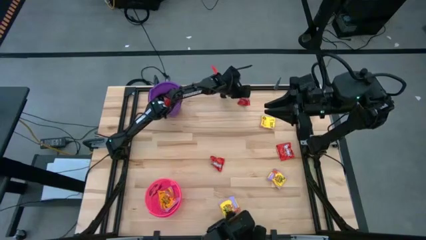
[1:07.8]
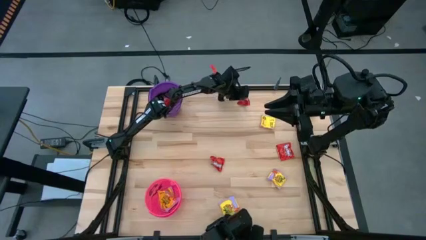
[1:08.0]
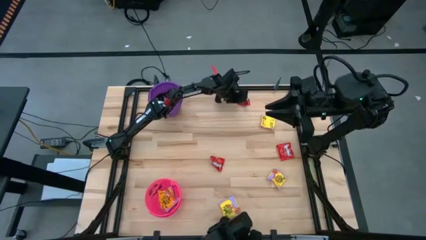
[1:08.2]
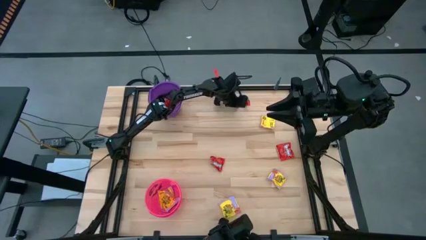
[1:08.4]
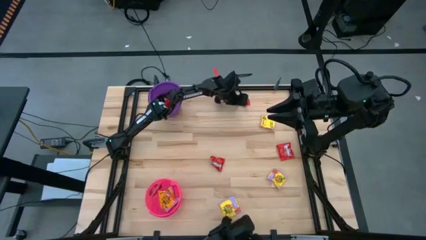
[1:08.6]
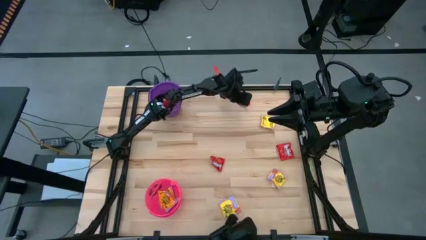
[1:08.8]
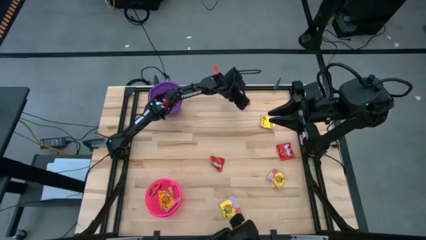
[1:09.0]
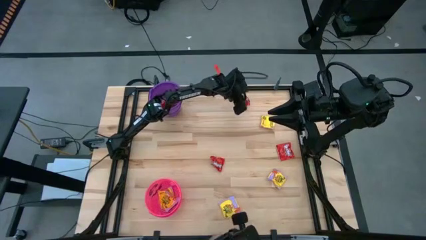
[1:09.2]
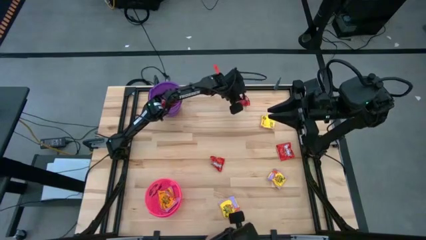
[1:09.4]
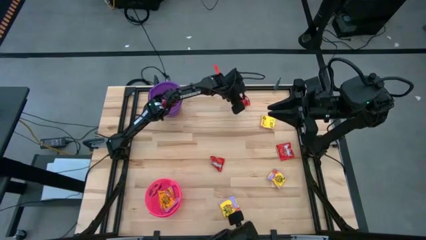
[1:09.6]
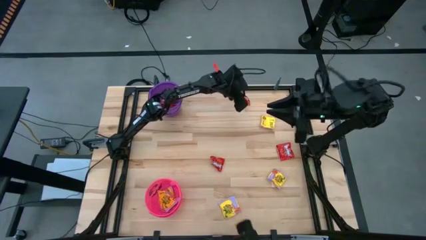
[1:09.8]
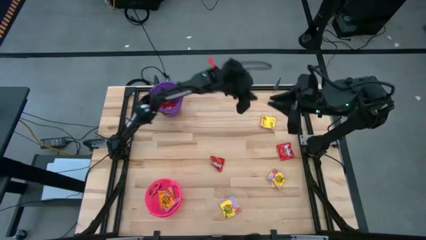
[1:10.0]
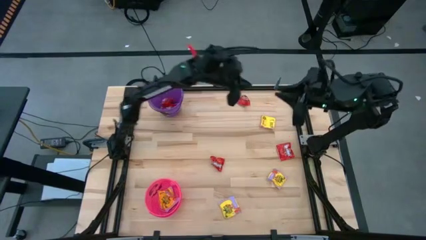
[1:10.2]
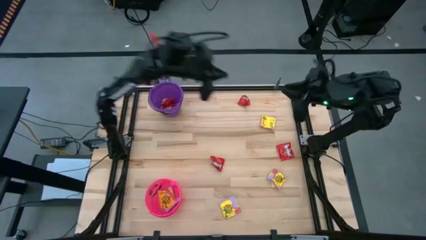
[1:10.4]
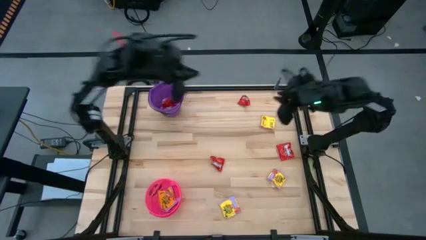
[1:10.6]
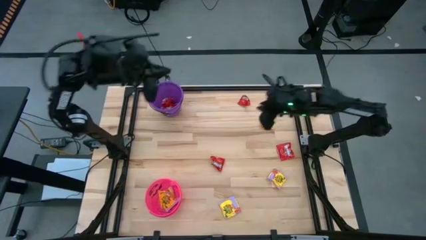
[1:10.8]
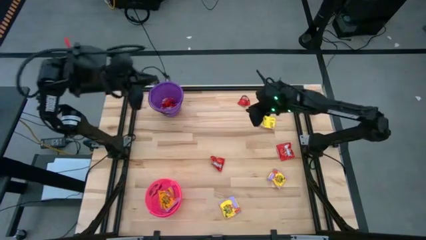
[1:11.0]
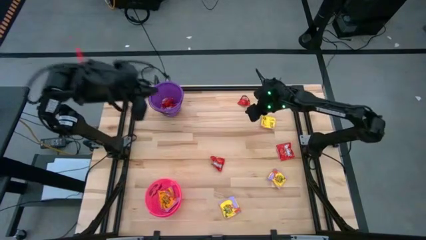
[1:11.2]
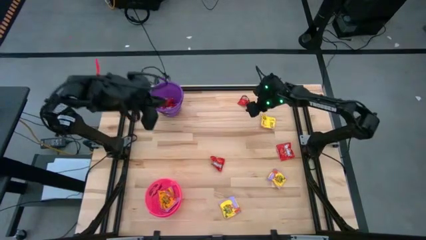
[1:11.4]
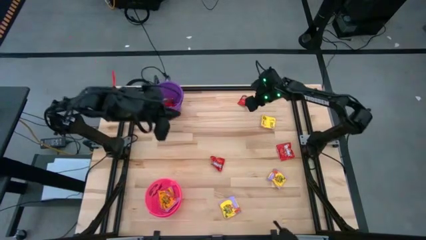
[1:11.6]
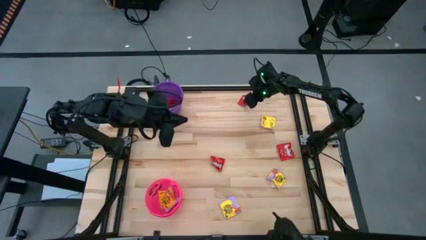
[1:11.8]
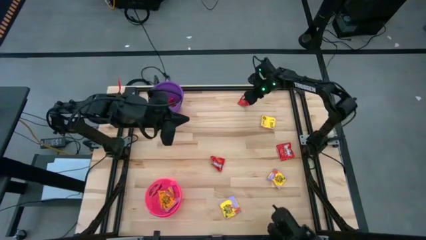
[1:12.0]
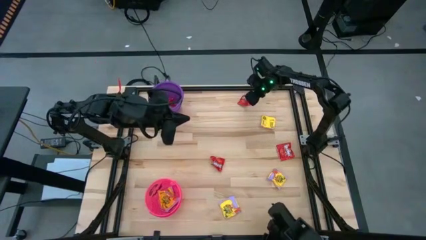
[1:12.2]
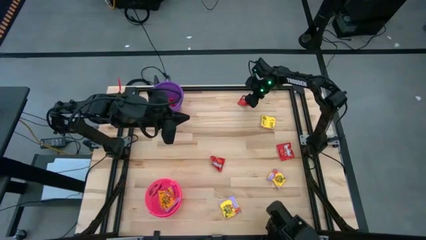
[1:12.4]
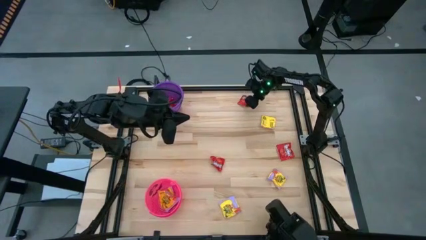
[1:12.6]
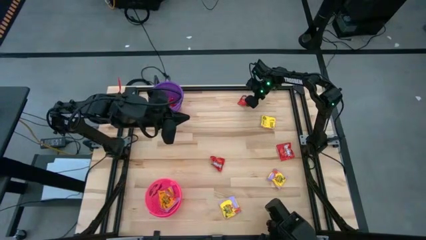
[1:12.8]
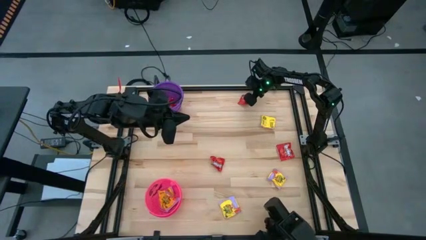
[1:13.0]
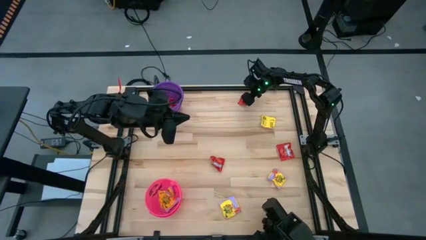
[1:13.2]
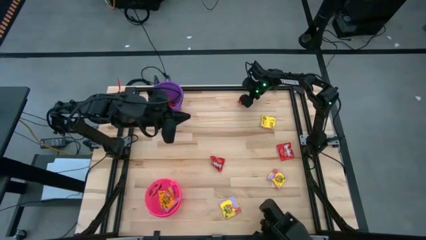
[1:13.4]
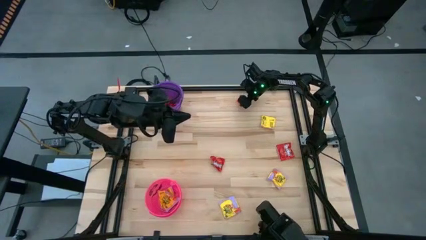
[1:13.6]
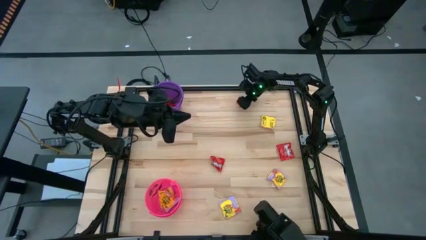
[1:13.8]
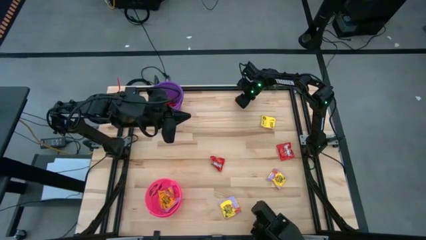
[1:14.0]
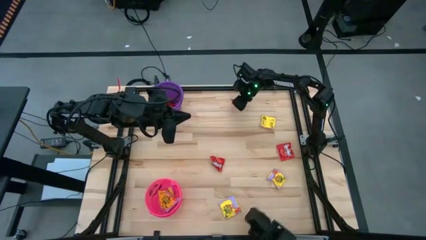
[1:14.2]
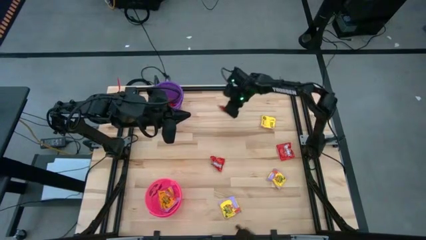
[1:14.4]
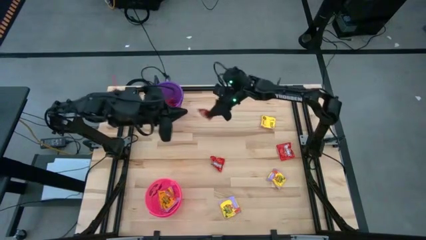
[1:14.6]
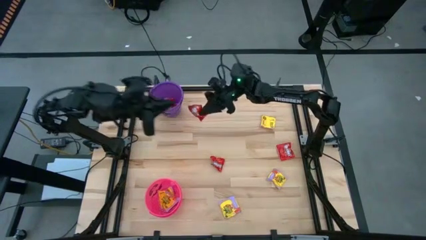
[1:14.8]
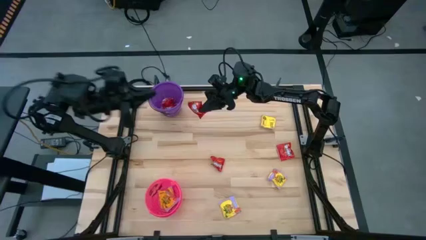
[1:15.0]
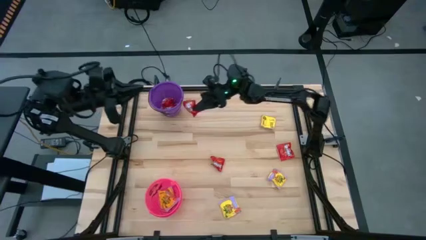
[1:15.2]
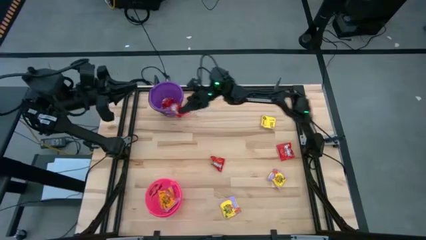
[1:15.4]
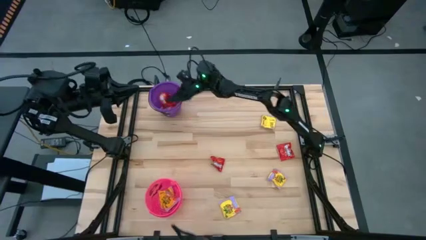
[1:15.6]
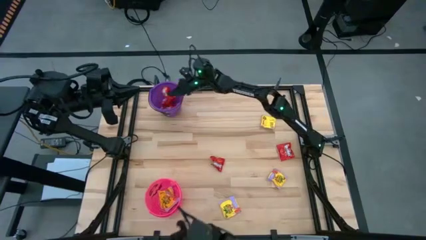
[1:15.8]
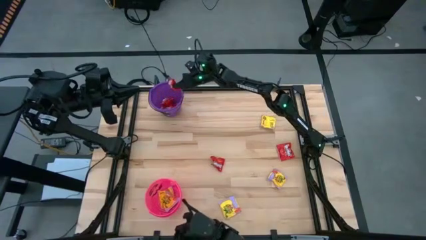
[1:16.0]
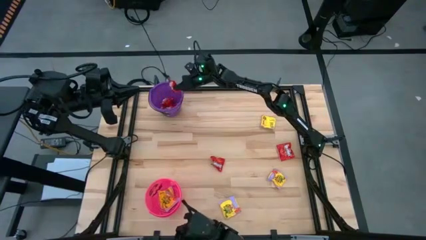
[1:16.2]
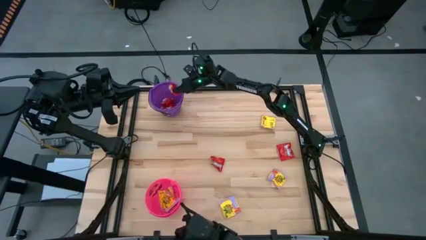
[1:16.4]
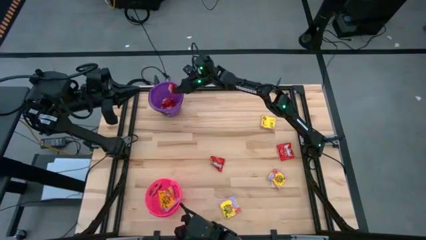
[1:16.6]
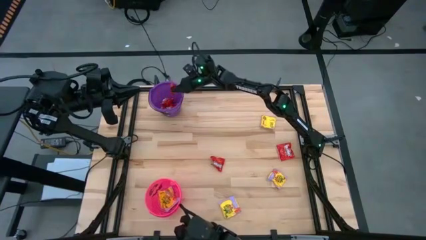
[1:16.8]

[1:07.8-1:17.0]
Task: Sort candy by brand, put in halloween buckets
Put the red candy into the purple bucket

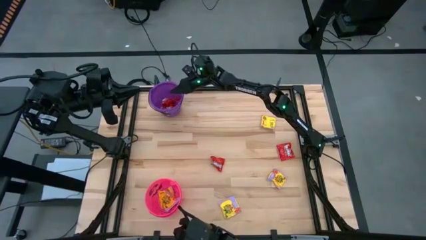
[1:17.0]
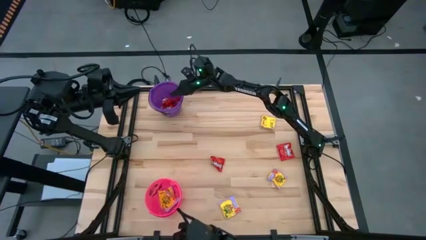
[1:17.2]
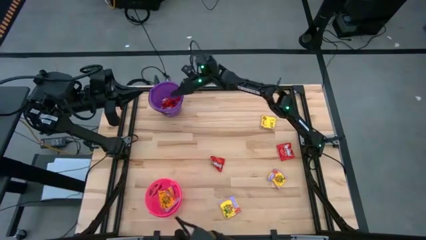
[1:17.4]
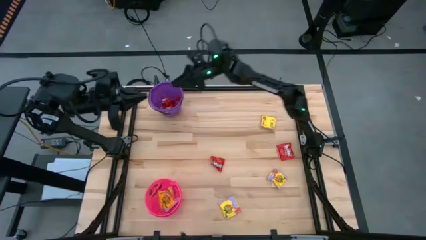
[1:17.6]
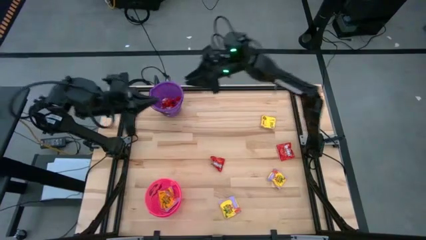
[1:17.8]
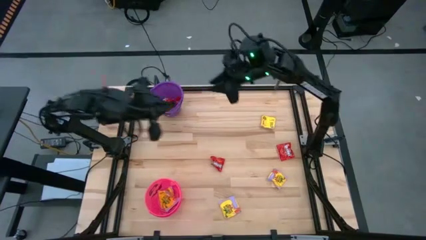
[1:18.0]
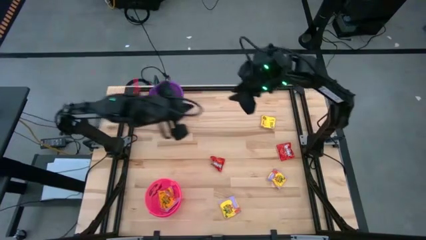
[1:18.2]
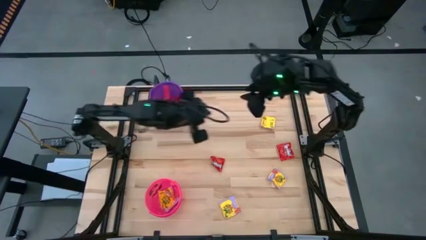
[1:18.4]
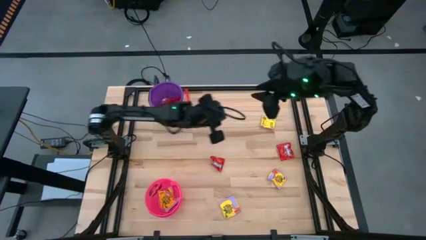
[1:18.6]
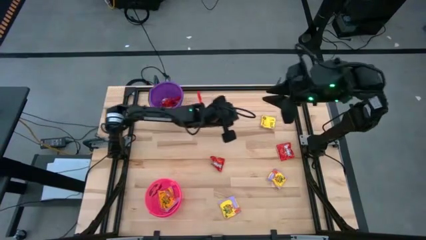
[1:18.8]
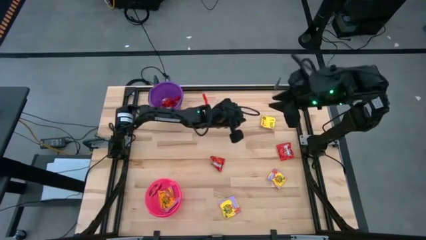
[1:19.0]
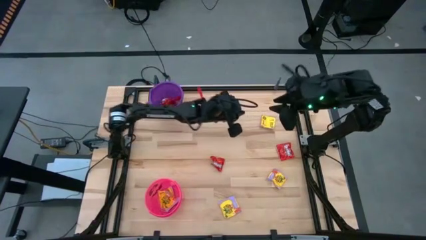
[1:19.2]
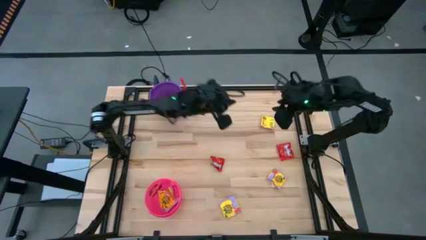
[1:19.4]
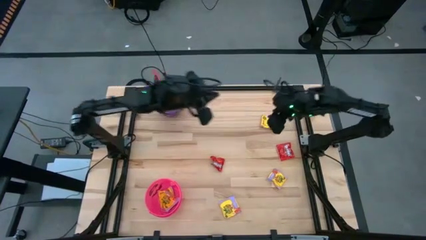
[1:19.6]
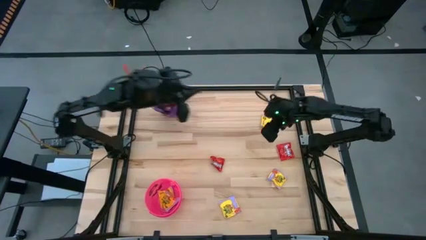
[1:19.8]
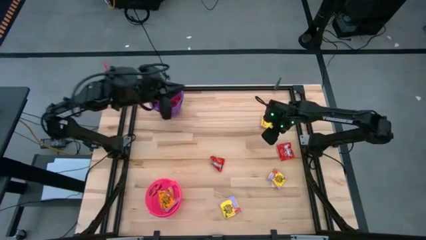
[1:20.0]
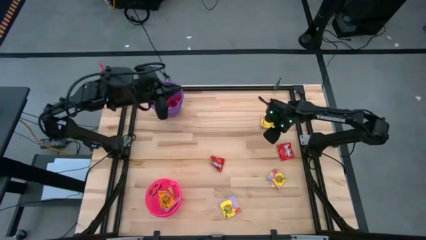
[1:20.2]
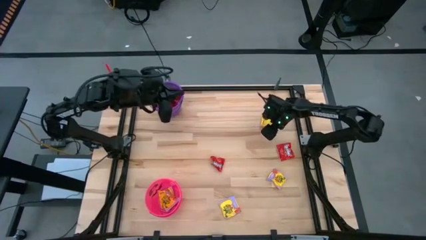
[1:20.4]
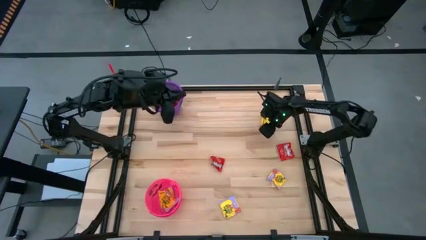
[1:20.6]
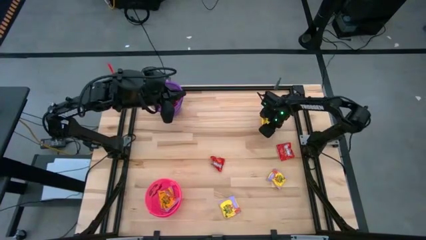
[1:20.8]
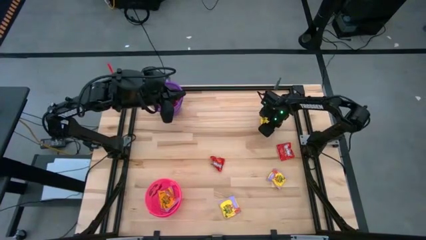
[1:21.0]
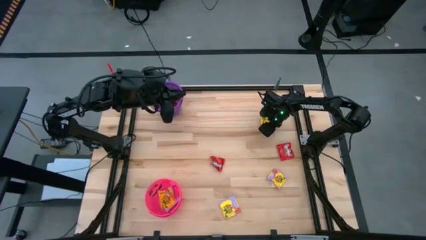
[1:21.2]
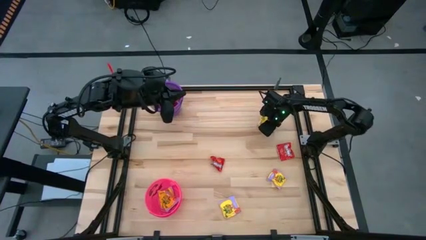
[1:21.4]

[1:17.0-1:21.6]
Put the yellow candy into the pink bucket

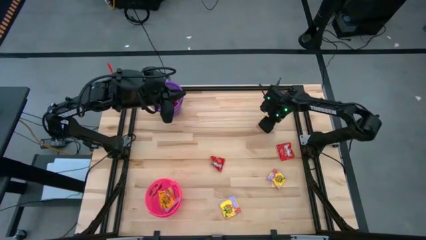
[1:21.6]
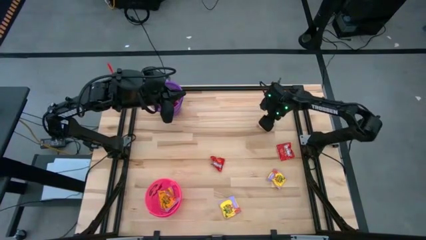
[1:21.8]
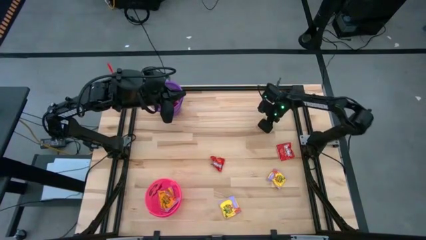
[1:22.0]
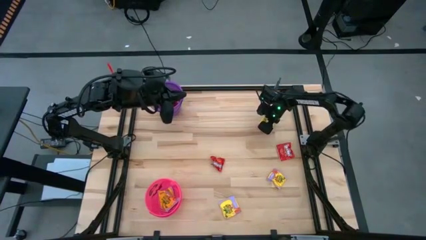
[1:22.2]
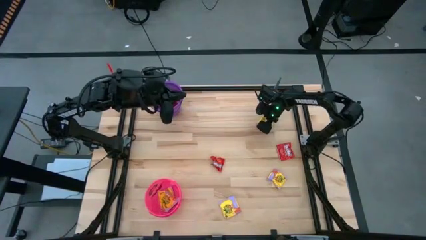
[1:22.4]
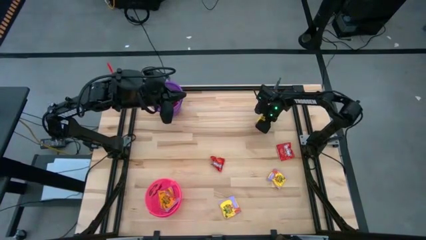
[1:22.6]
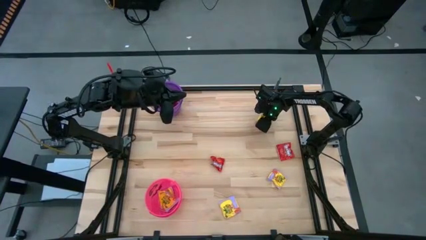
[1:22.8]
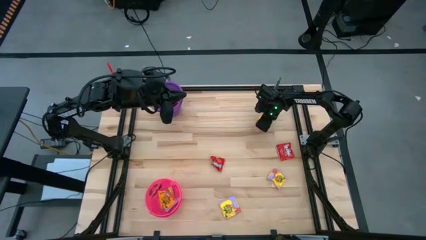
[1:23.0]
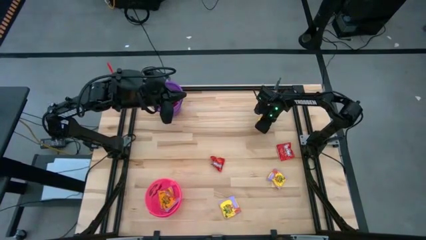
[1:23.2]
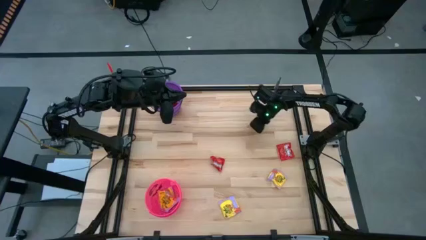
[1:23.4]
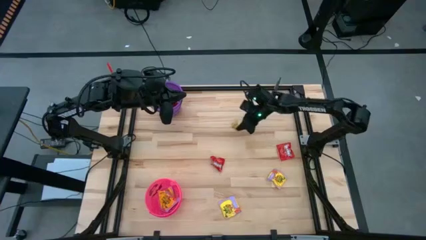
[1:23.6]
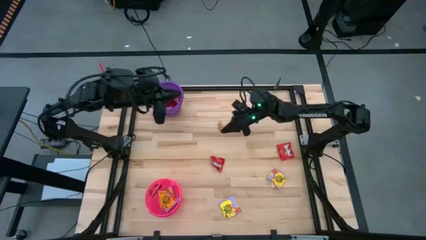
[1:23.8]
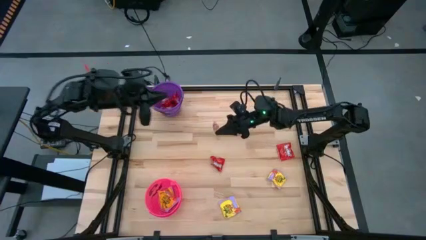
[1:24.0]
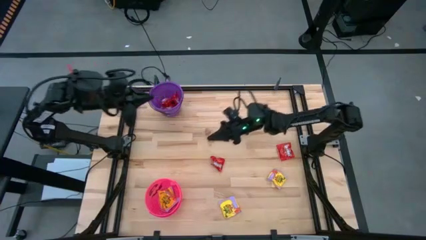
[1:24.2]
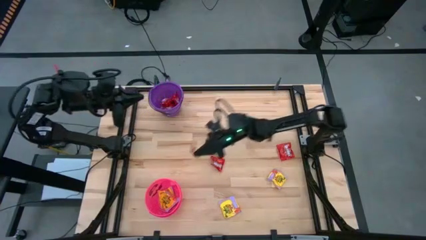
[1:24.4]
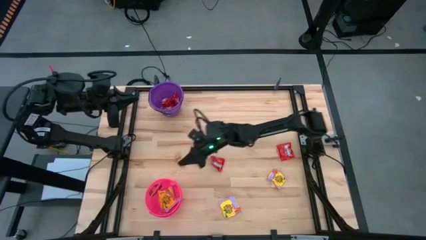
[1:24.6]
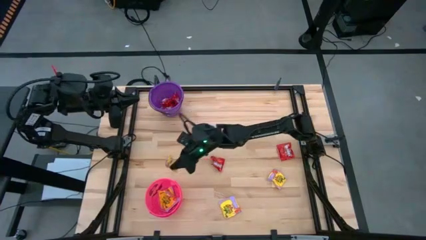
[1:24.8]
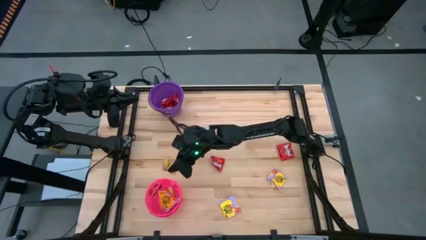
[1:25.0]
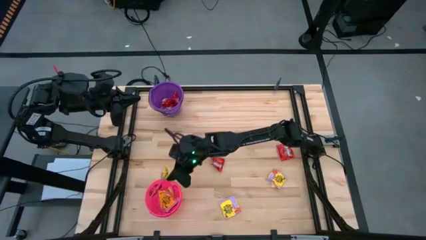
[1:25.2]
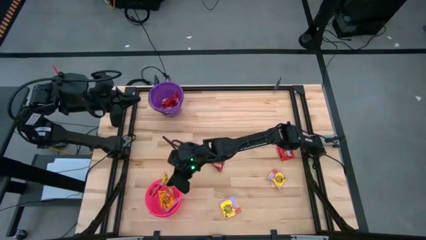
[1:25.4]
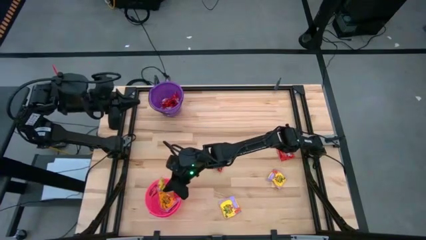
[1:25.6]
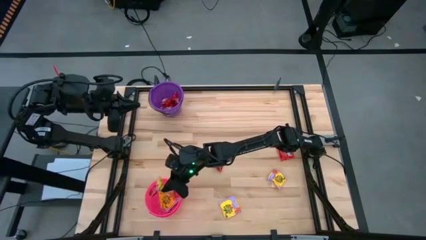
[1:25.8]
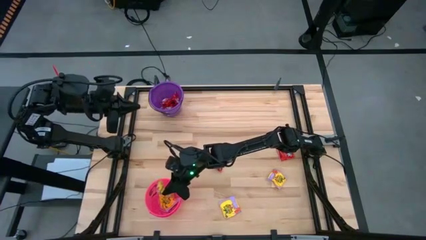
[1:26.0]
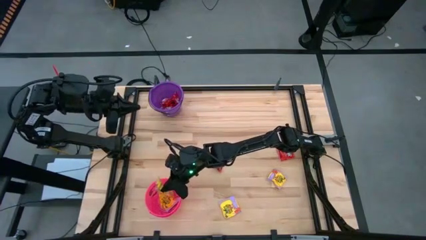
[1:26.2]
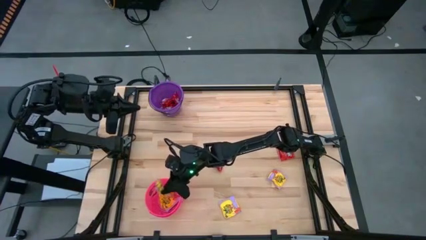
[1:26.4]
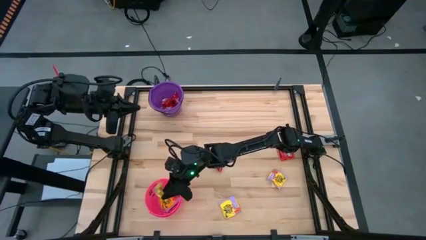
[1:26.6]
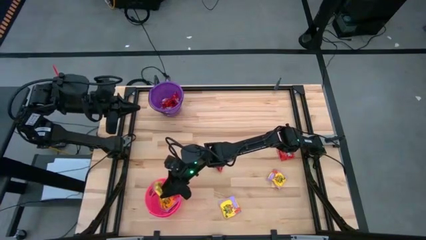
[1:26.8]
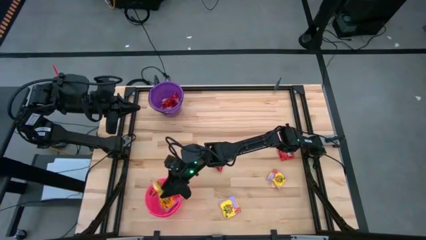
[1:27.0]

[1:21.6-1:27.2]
Put the yellow candy into the pink bucket
